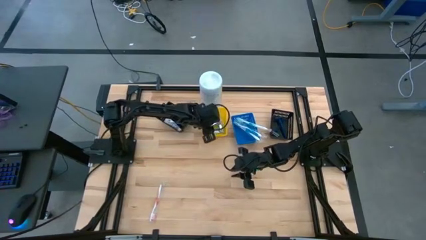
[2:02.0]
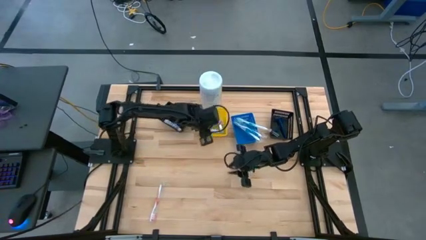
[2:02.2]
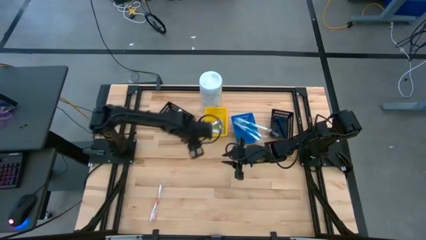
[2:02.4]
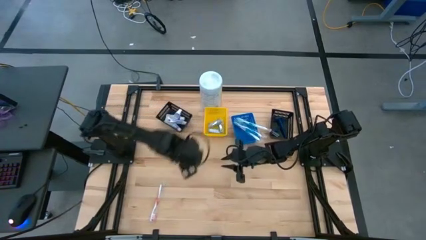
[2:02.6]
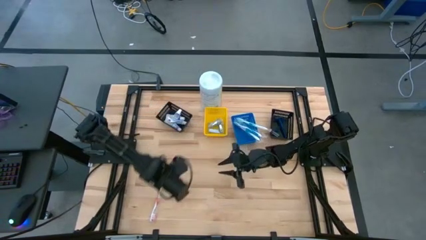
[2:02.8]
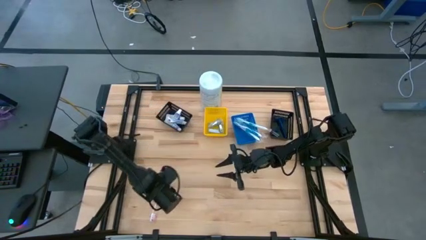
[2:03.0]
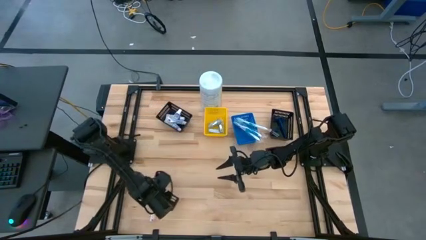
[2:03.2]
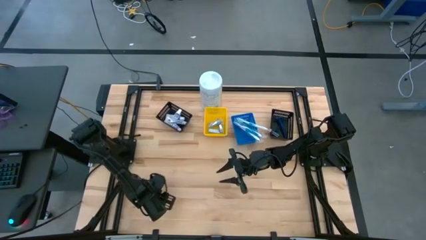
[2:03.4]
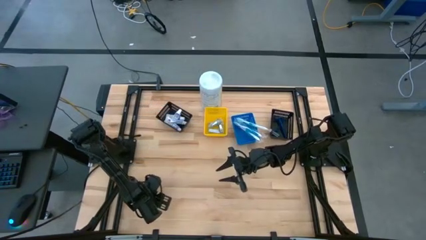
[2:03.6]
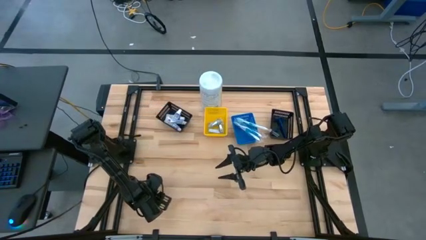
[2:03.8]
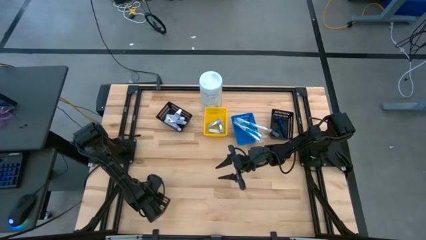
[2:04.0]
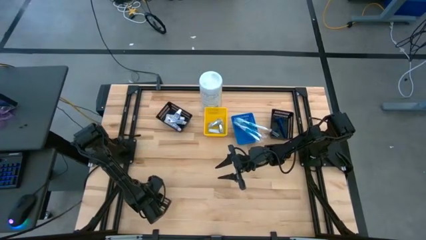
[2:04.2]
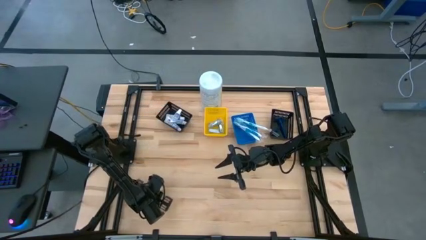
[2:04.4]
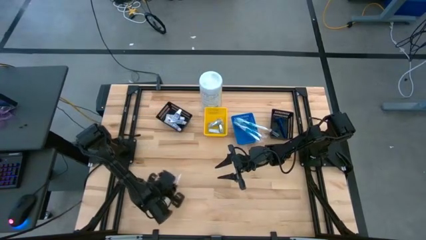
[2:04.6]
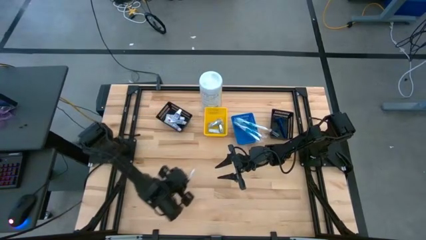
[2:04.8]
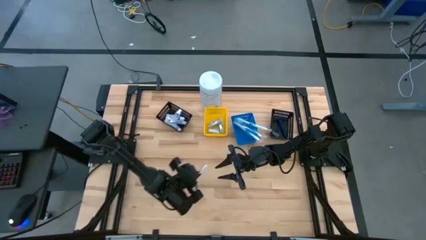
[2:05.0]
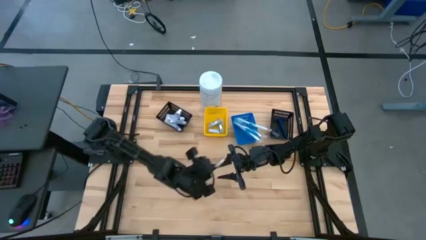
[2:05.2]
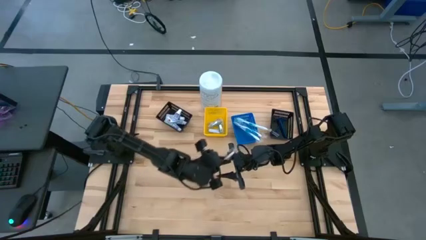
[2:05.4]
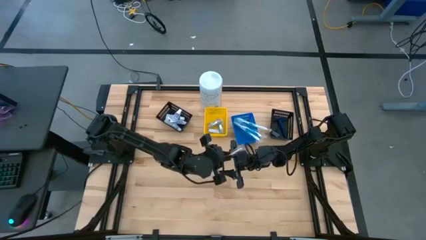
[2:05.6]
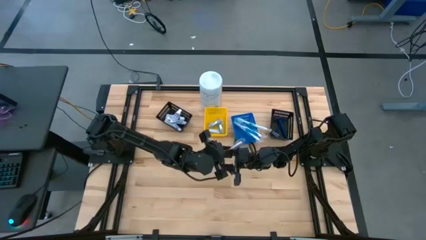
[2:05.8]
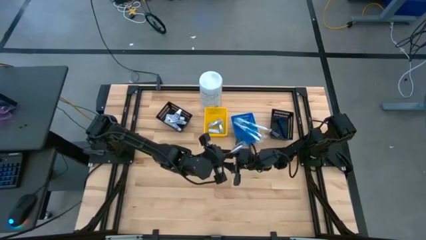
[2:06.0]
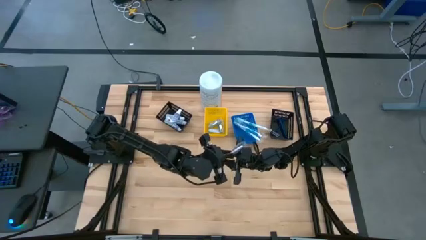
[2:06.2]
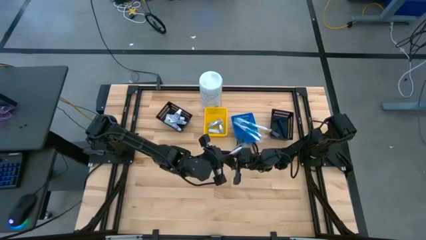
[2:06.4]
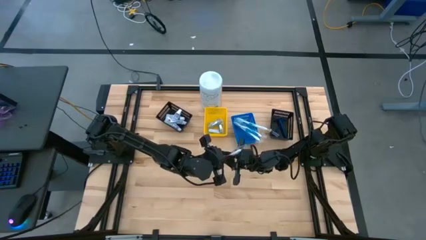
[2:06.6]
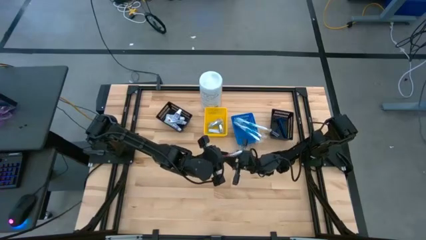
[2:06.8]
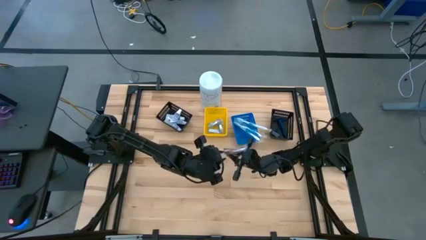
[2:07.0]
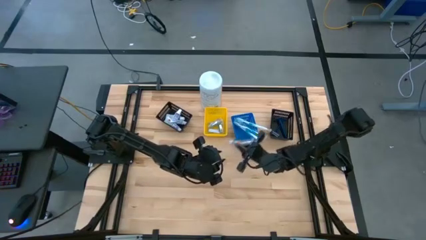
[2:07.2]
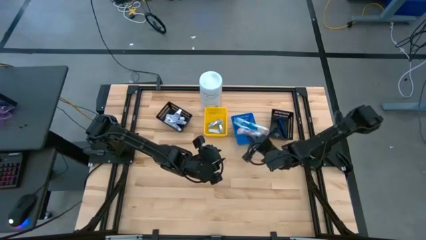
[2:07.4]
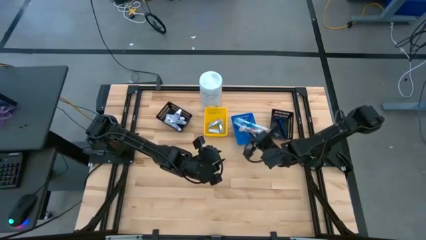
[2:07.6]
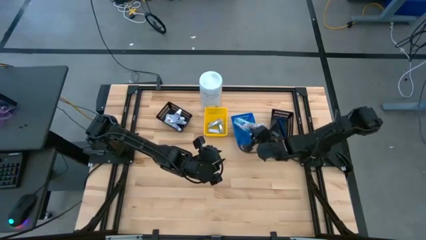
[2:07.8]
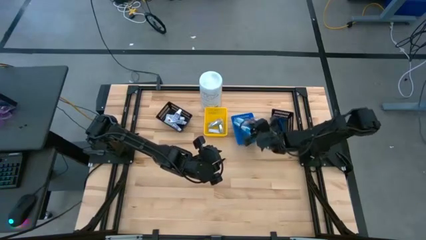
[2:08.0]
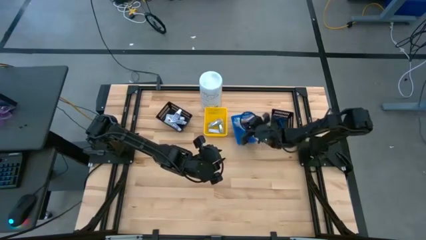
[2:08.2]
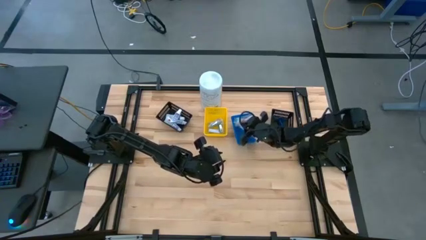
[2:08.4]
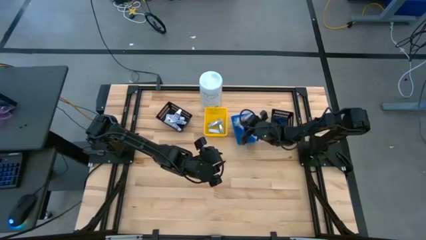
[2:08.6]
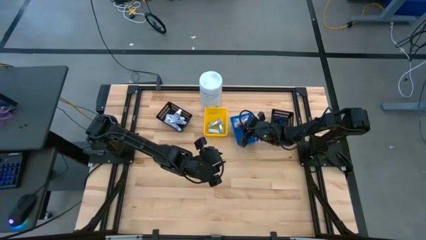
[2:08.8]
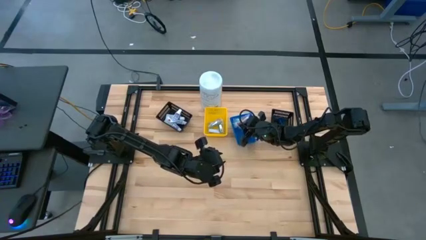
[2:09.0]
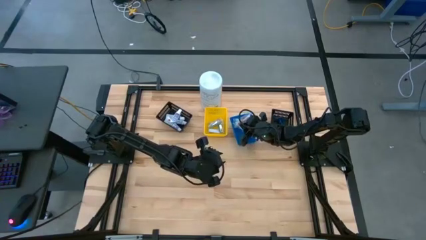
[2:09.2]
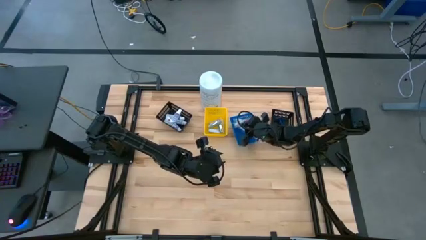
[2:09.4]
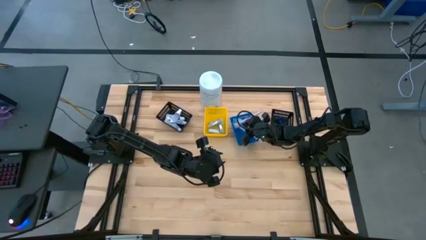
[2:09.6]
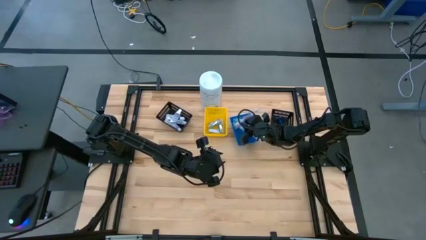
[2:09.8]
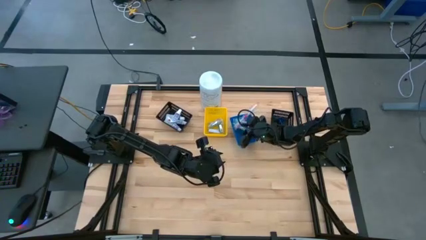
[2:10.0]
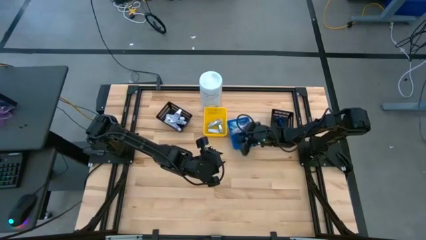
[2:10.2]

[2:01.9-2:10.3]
Task: Pick & Place Travel size toiletries
Put the red toothbrush into the blue bin

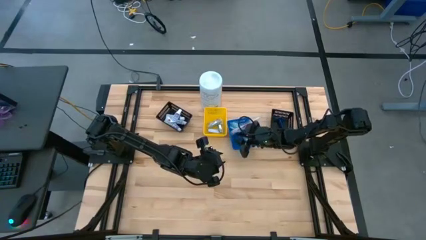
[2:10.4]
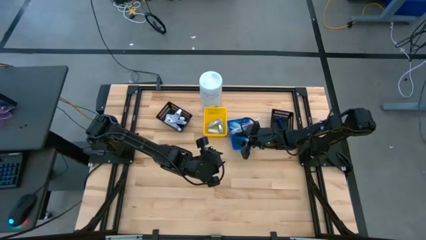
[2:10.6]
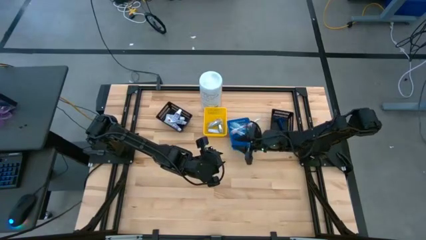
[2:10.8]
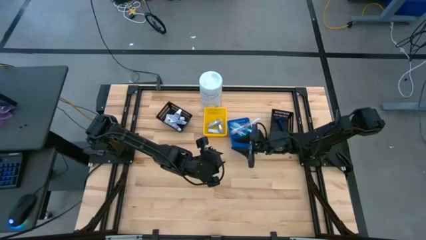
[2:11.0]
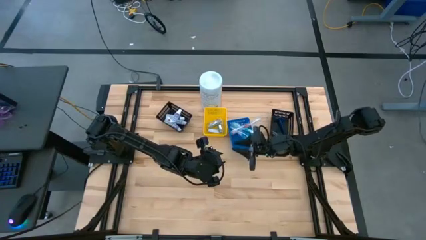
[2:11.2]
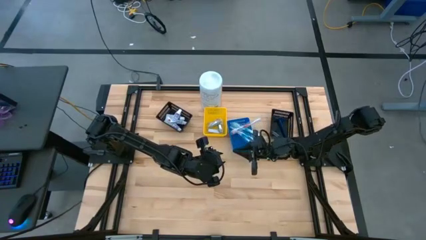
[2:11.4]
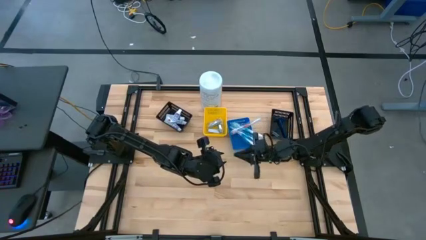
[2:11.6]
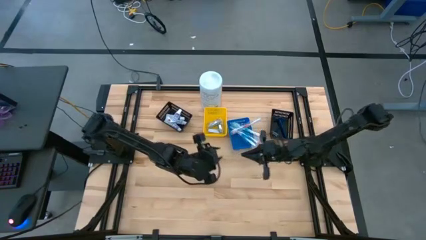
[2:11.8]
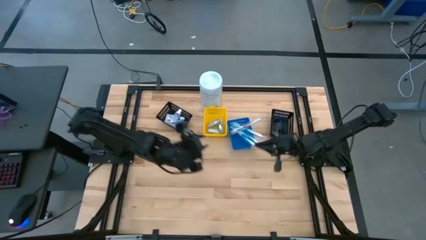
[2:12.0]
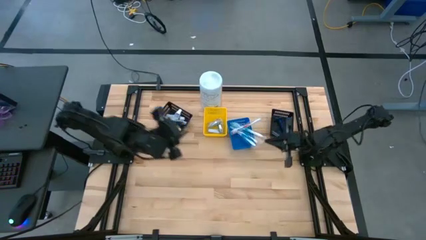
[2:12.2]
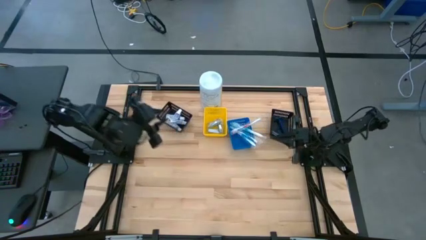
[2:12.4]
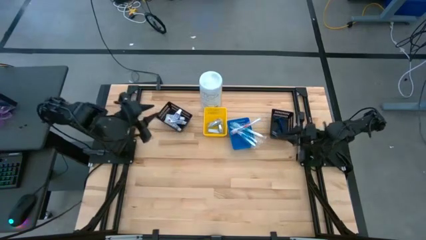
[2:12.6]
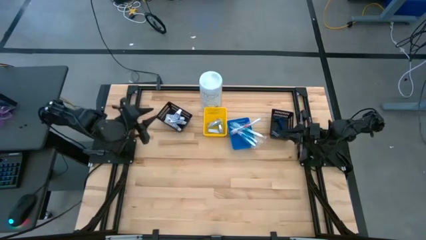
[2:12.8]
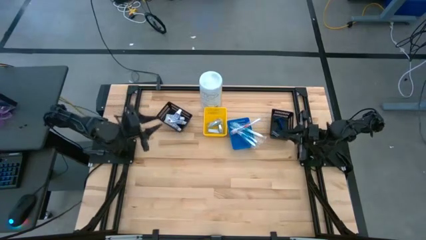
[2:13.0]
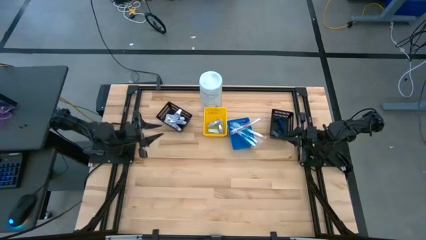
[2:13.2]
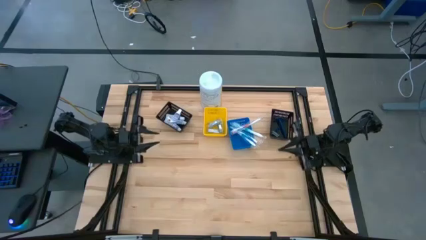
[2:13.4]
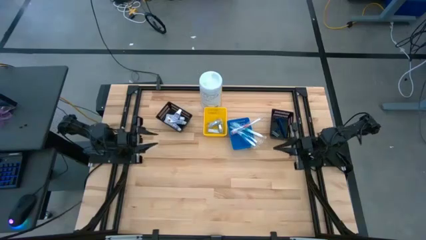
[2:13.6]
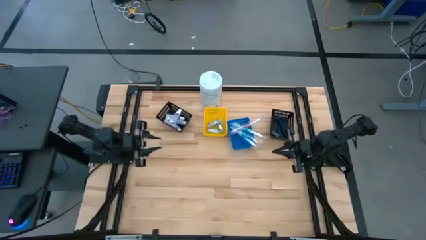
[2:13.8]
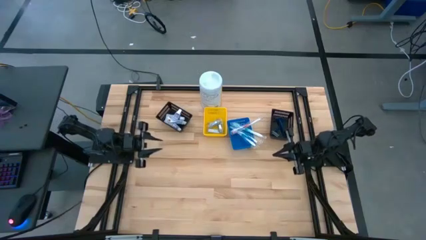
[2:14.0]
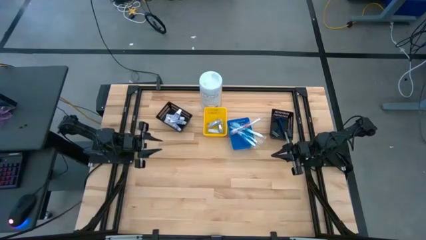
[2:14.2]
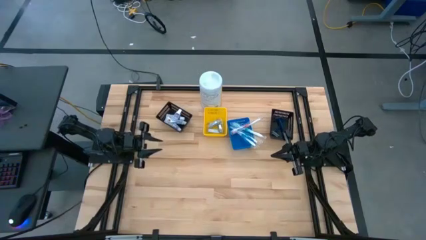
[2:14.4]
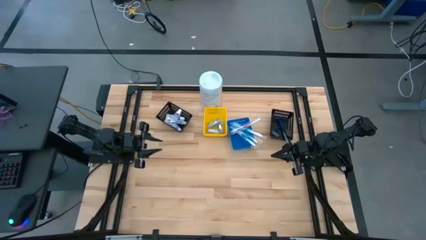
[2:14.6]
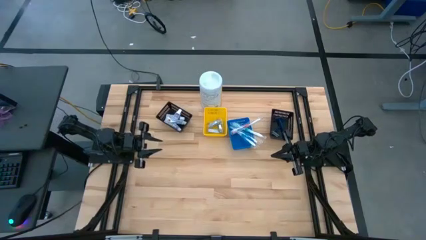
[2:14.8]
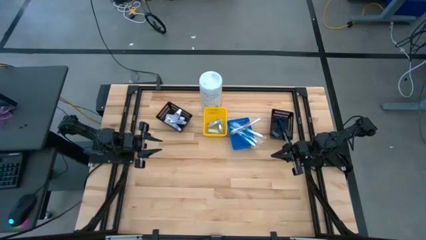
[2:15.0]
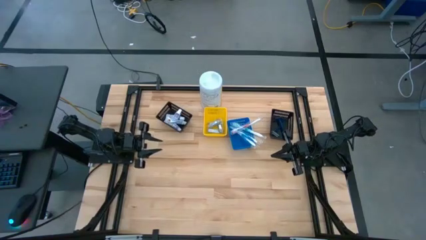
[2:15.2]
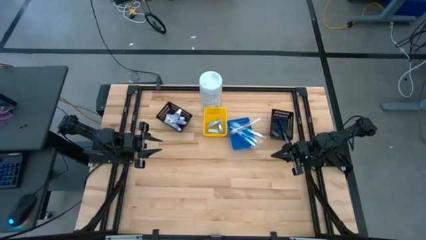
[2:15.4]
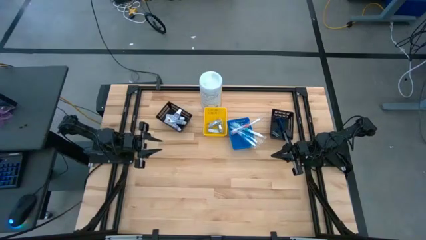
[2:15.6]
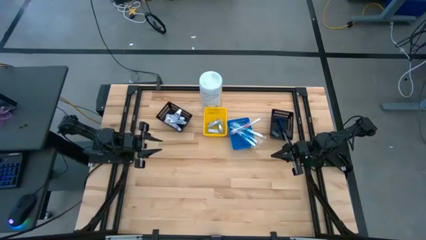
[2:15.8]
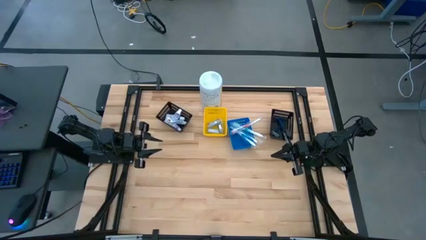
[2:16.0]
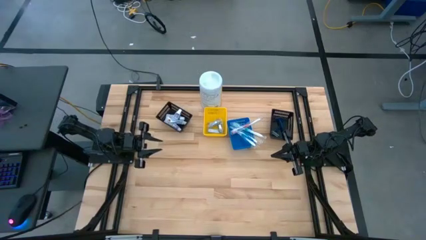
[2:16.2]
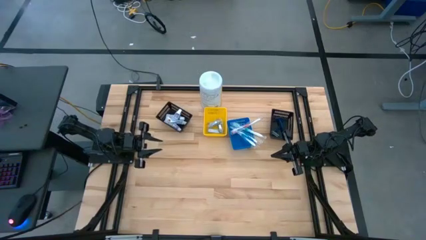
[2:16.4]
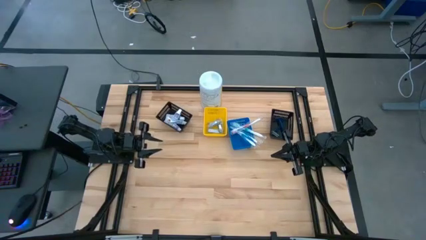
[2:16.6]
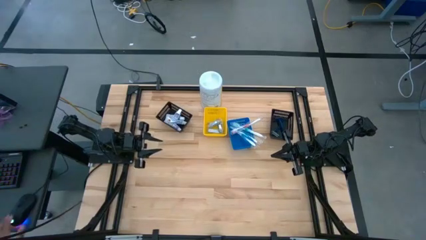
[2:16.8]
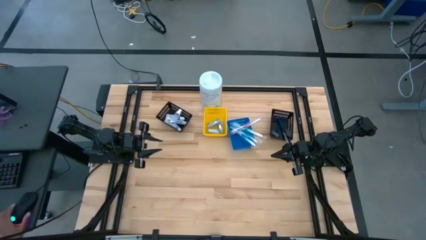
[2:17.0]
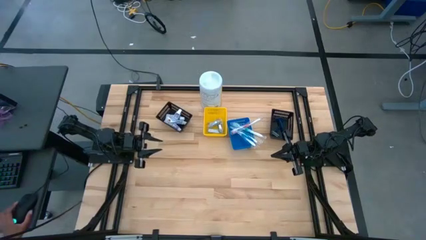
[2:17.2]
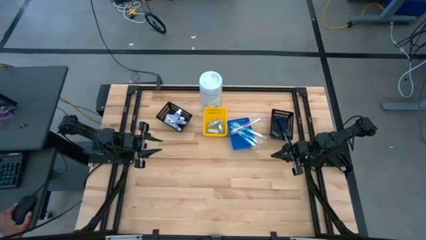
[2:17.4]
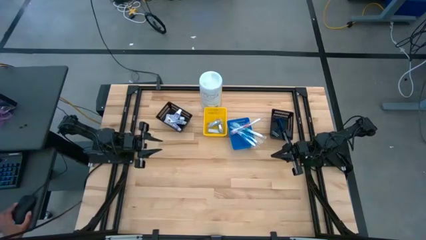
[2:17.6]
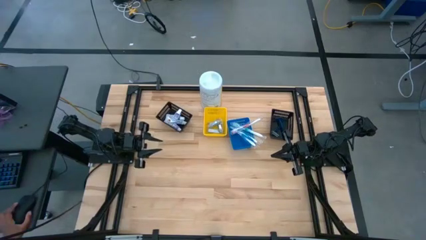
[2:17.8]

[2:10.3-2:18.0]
Return to Home Position

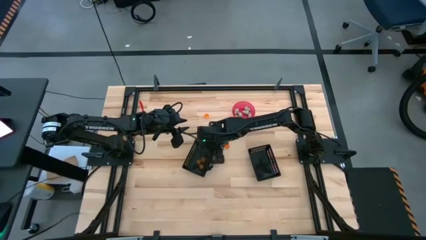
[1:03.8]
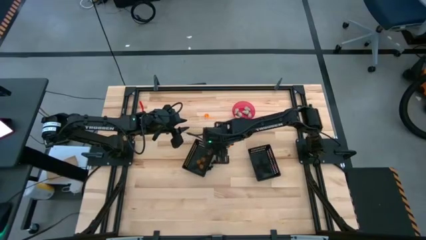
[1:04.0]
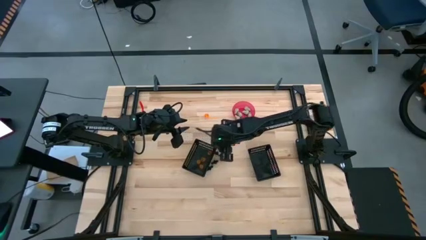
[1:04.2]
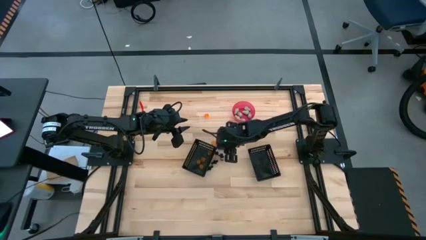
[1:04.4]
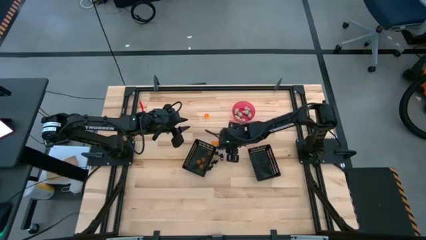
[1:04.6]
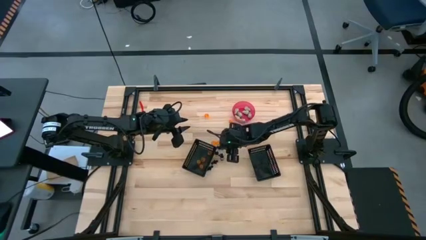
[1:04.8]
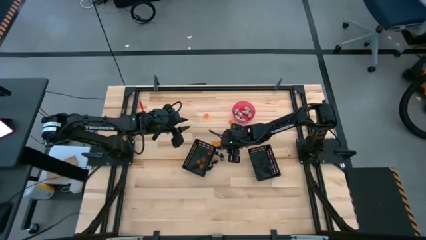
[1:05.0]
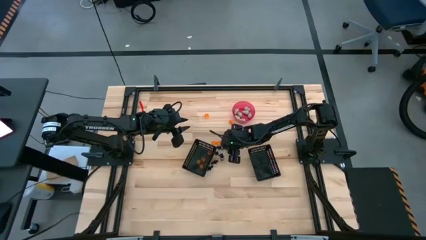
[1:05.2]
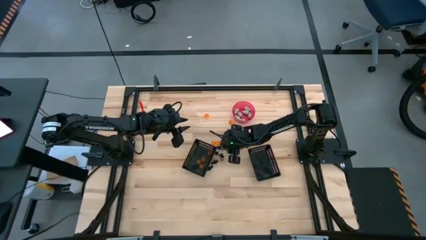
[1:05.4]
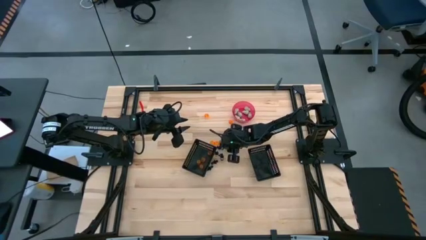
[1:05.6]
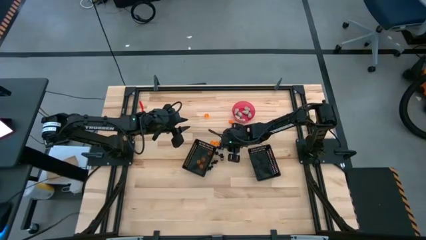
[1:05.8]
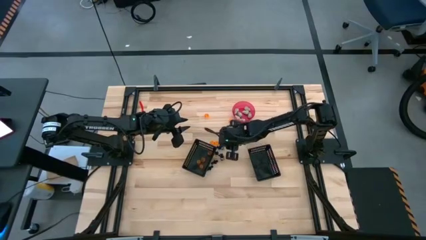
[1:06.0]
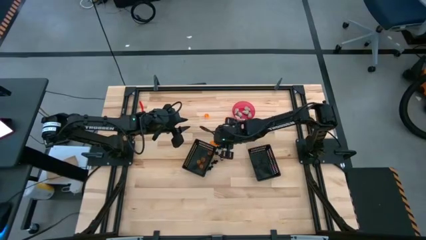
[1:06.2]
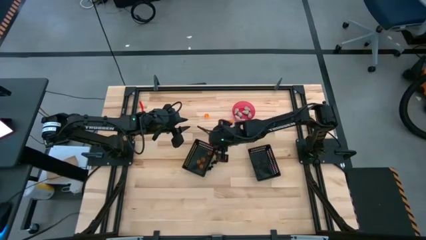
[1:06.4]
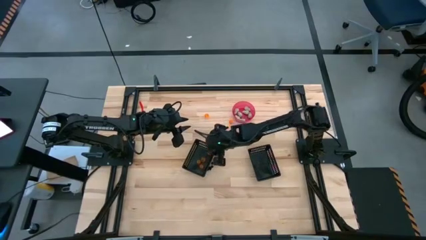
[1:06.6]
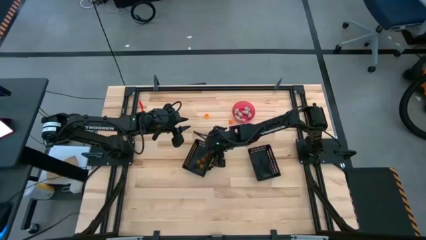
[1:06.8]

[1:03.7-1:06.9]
Task: Sort Halloween decoration
Put the orange pumpkin toy into the left black bin
